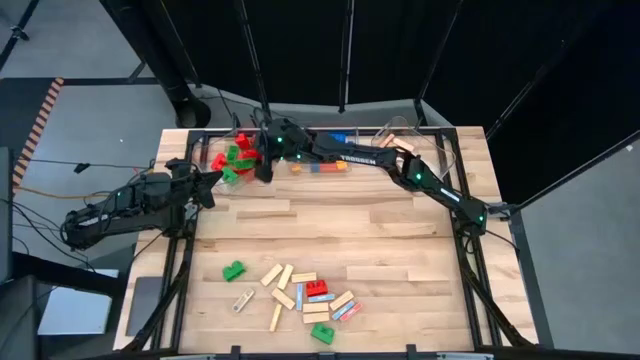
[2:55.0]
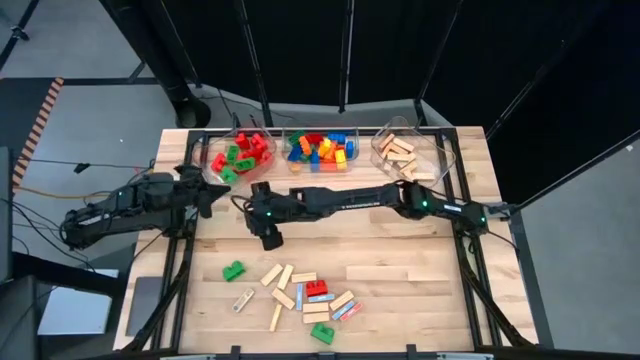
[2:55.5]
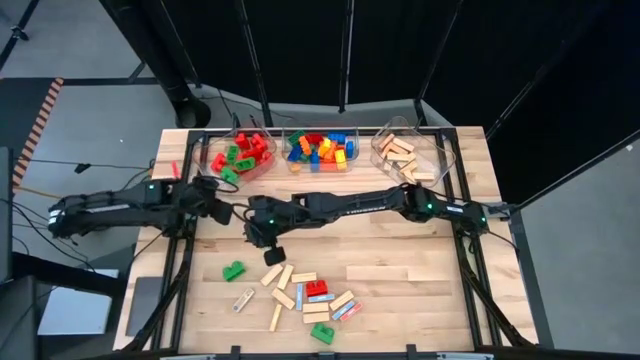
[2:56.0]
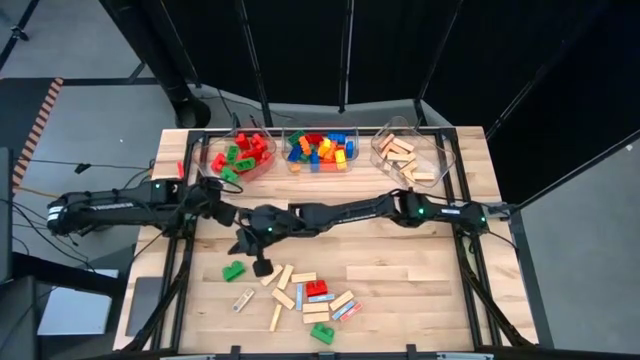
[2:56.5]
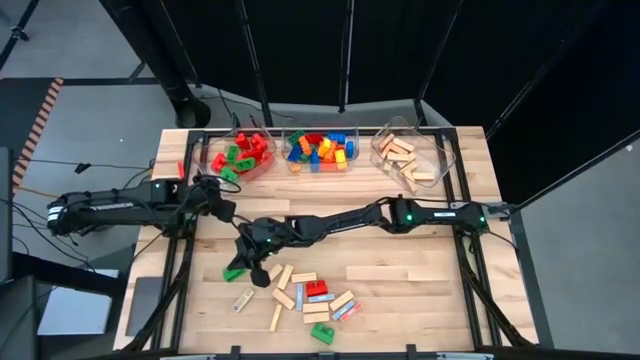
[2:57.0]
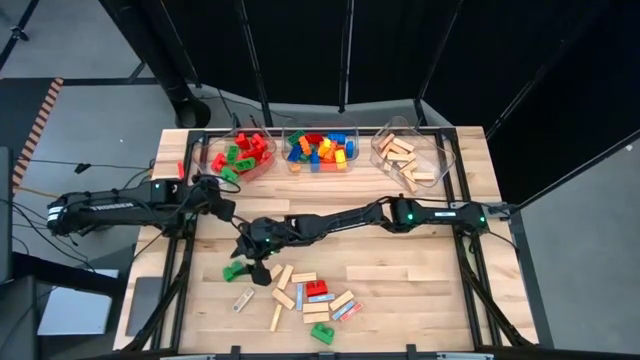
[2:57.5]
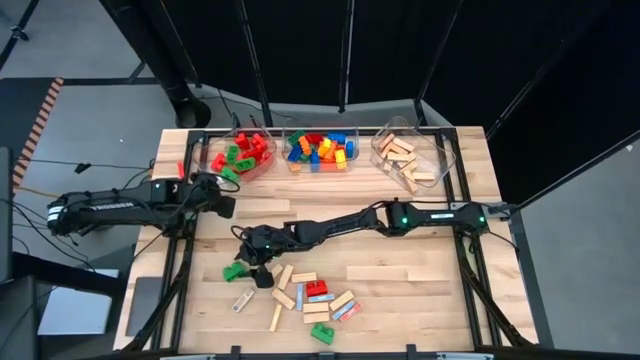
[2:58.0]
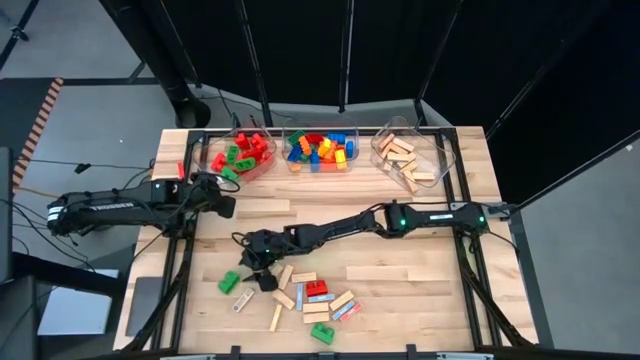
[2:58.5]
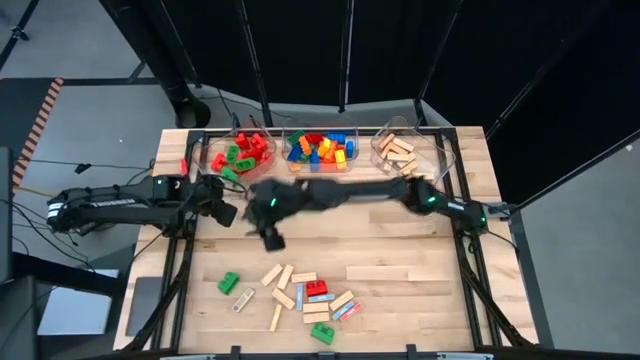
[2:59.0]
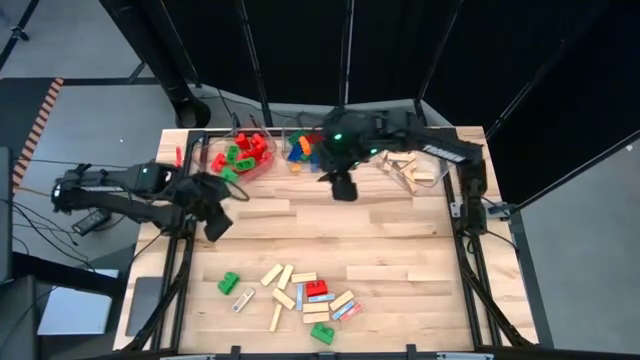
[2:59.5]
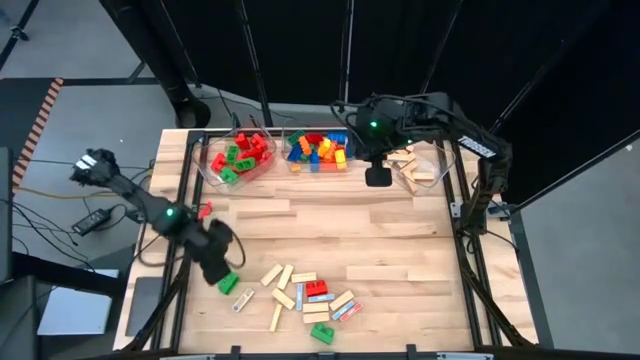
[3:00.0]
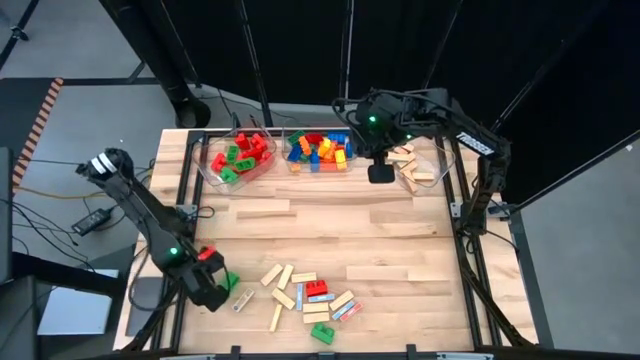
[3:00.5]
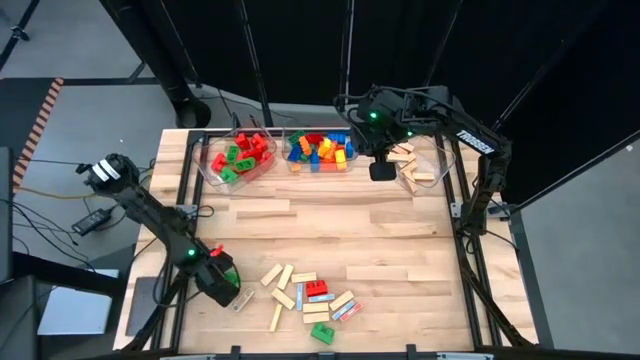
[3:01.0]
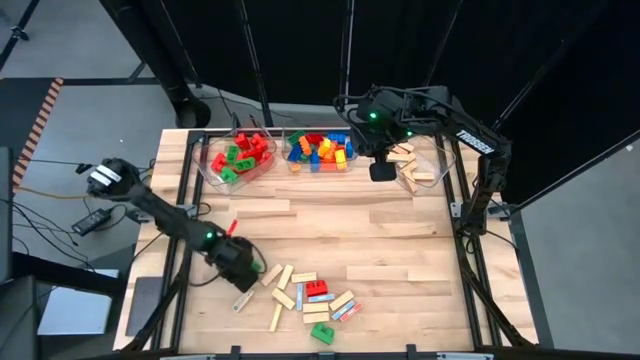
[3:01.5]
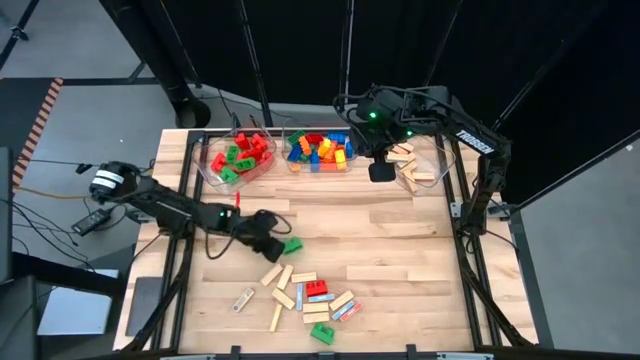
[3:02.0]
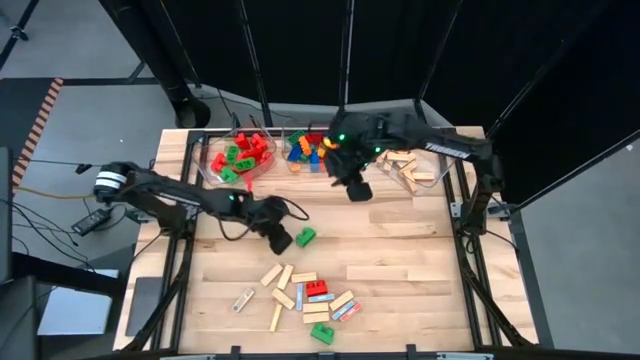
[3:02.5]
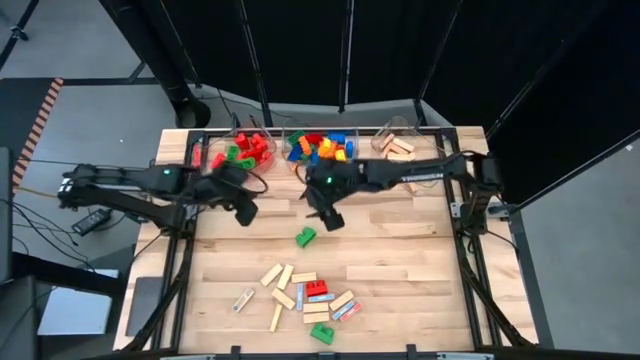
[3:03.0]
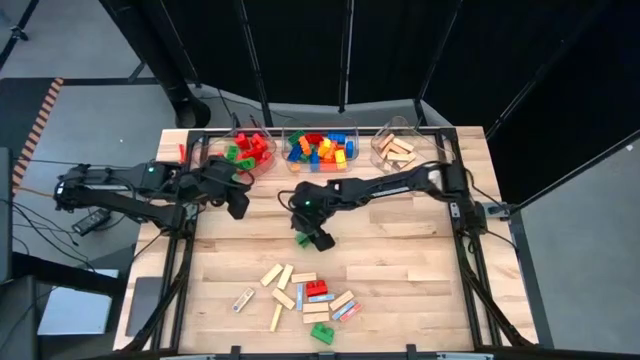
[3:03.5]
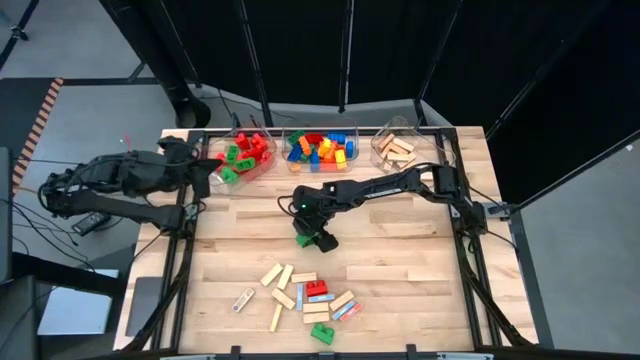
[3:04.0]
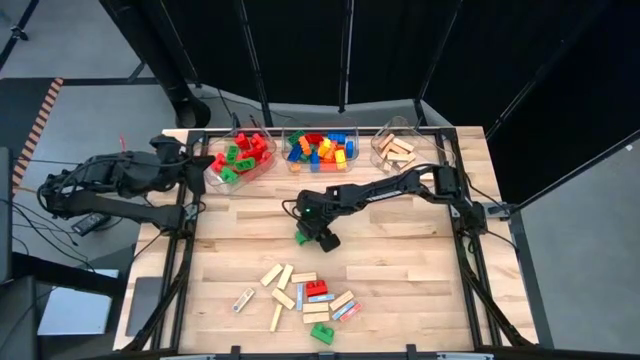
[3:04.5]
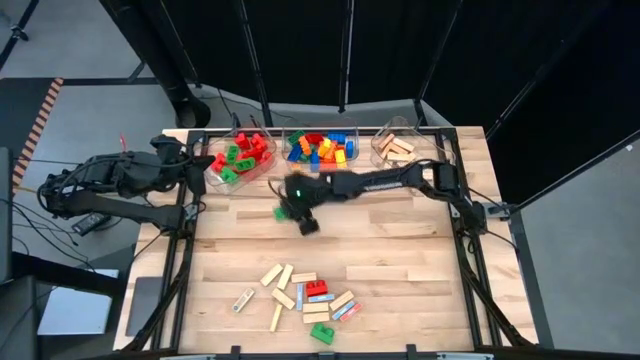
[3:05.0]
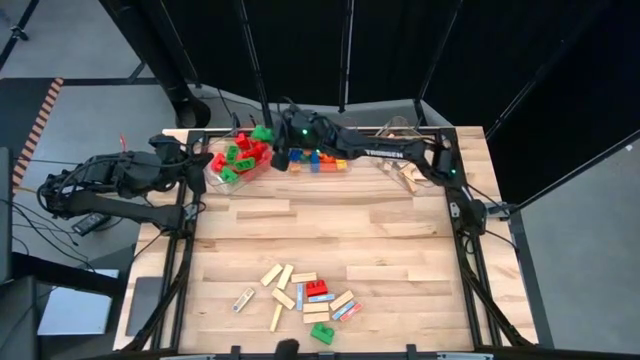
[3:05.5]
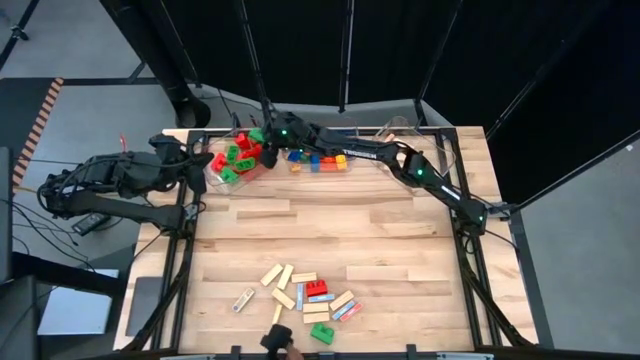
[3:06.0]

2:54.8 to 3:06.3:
Task: Sort blocks by size
Put the small green game piece into the left transparent bin

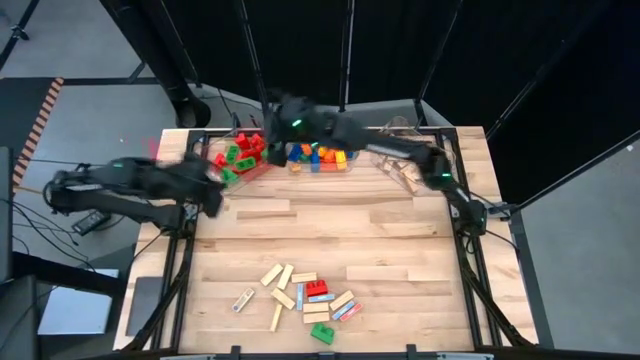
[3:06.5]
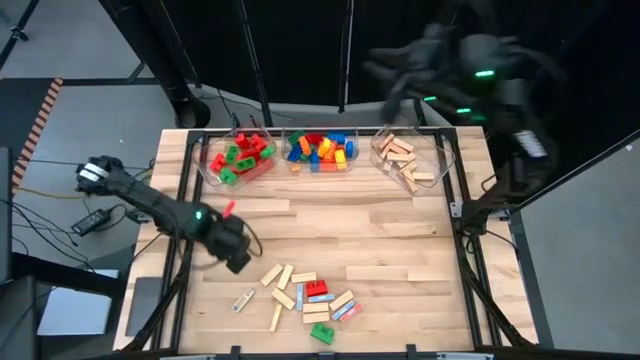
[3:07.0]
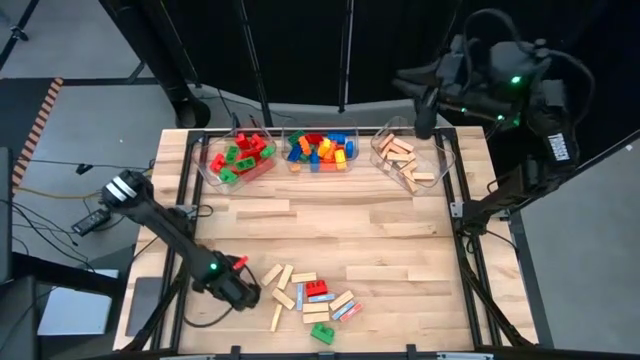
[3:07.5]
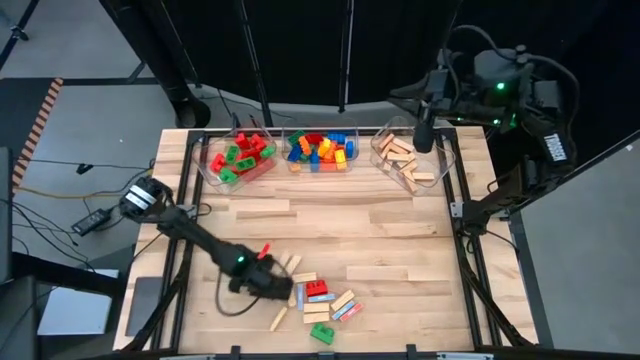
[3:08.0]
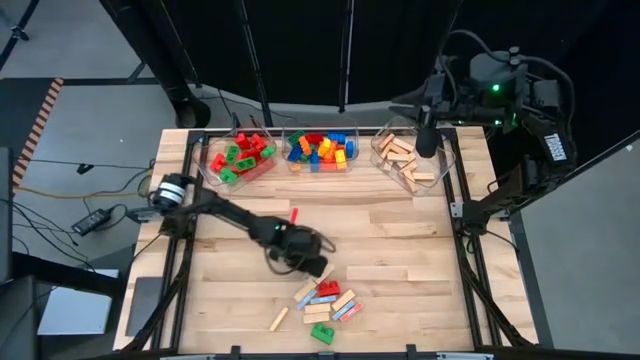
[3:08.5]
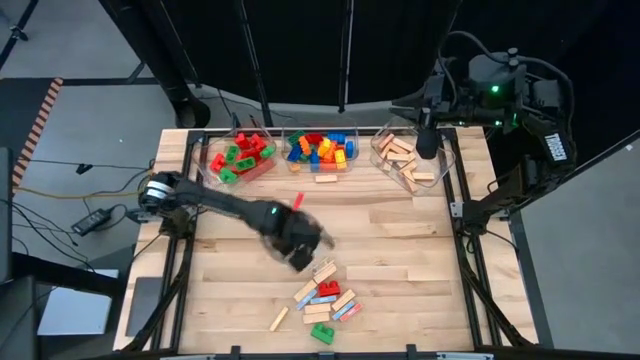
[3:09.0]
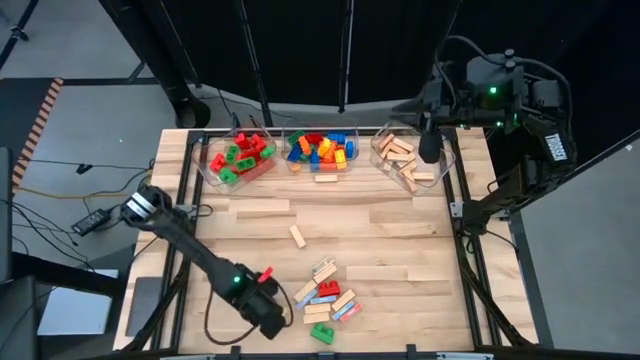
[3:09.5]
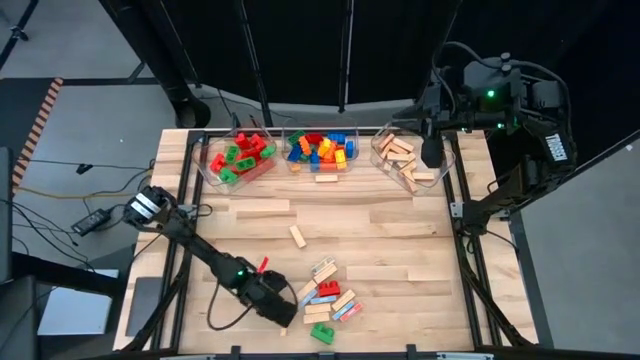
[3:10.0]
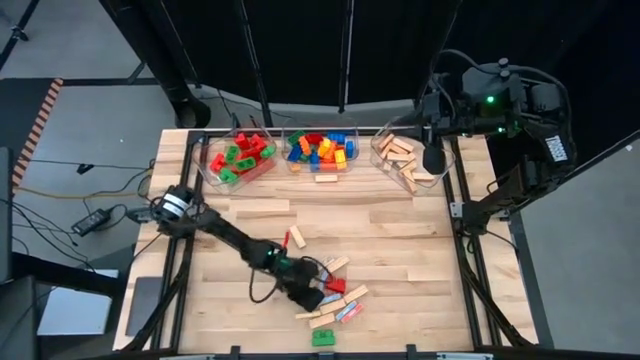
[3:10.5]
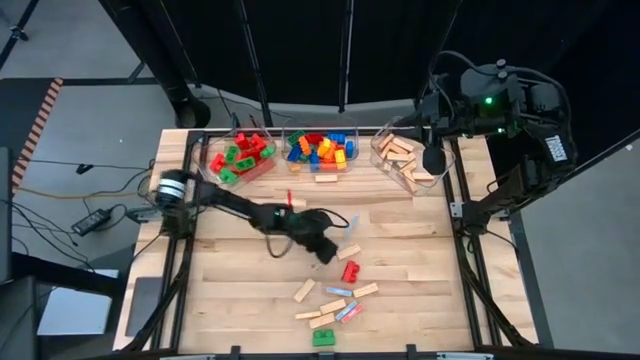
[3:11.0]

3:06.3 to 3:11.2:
Adjust the brown wooden blocks on the table

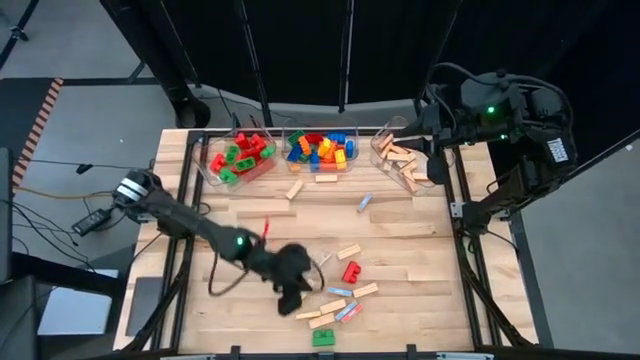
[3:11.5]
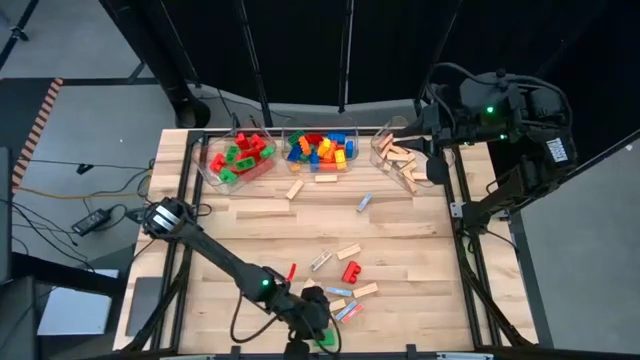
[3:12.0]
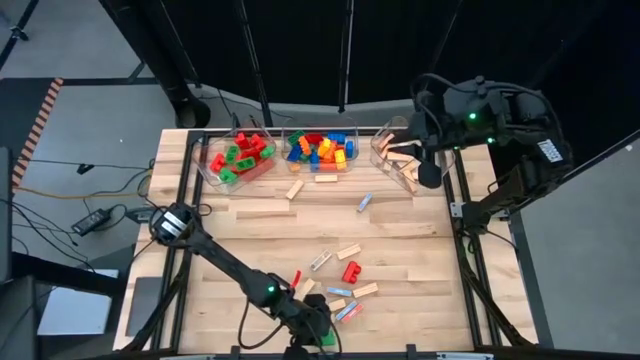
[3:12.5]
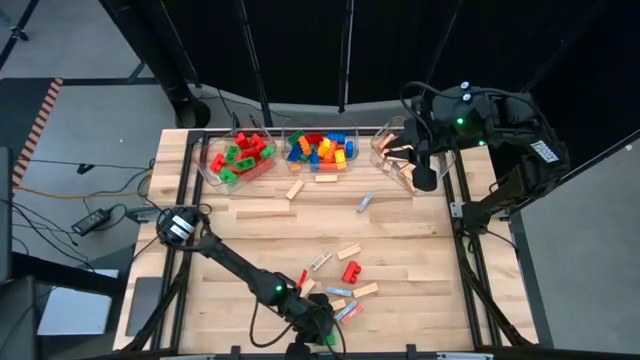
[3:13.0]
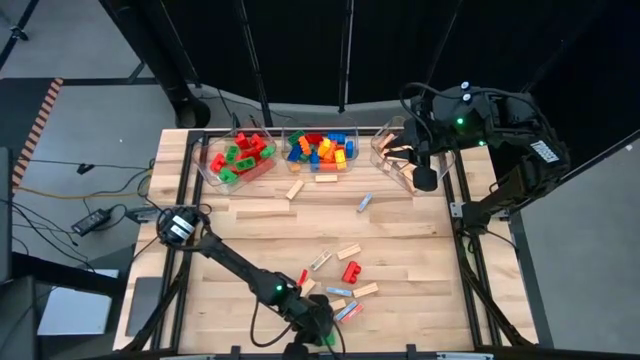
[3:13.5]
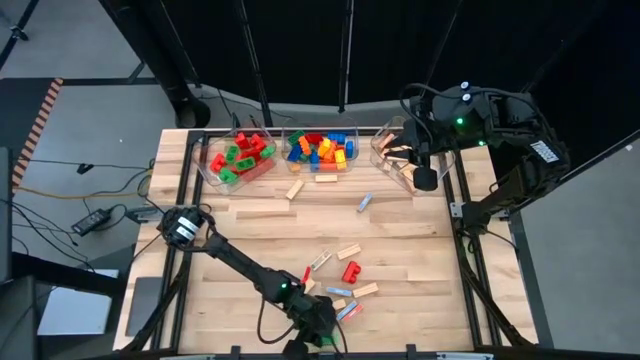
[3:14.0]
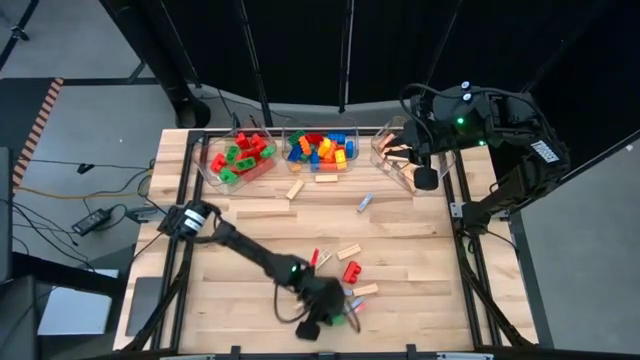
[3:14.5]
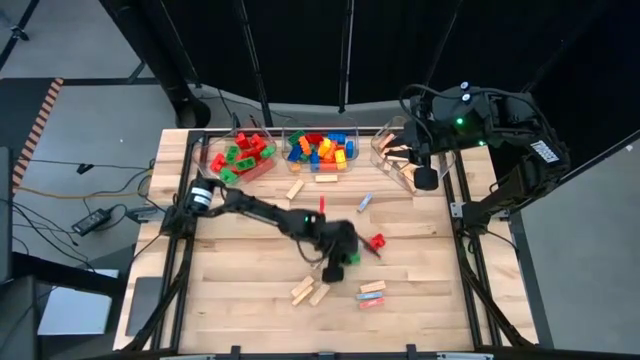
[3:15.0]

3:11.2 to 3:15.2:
Move the small green game piece to the center of the table

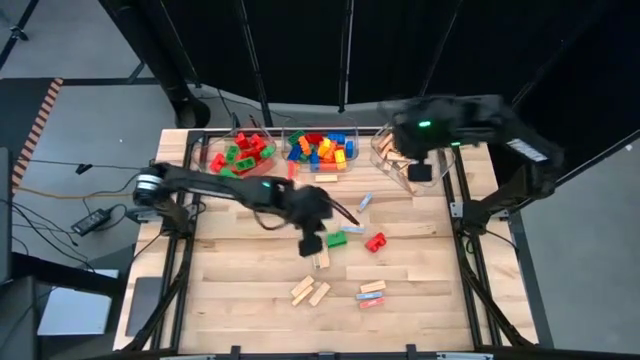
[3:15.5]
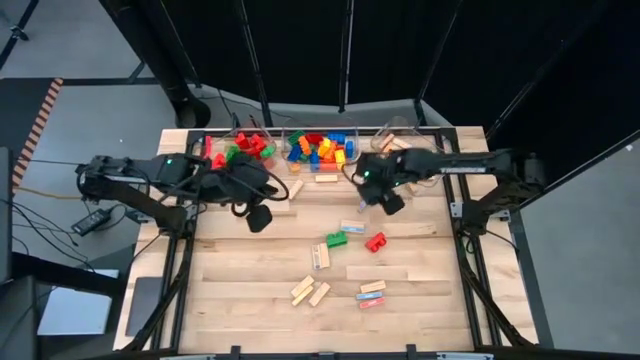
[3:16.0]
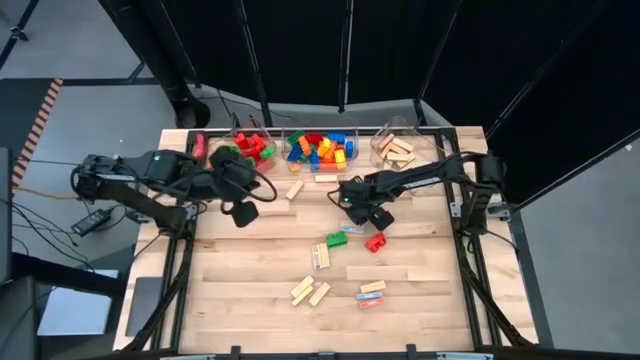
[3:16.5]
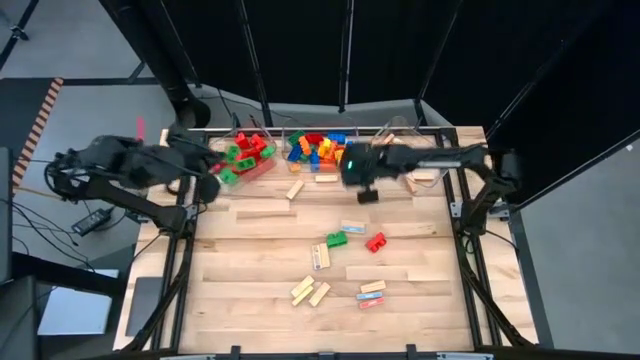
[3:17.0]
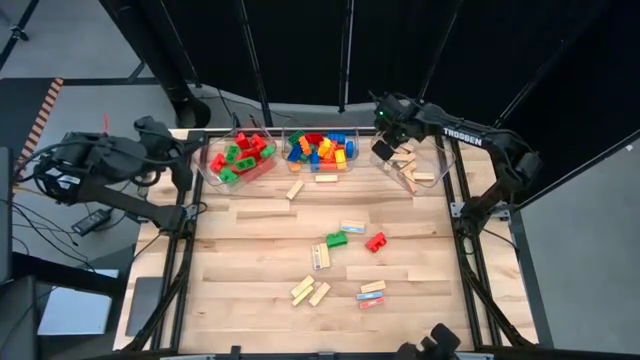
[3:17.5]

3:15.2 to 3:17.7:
Put the brown wooden block into the right transparent bin
